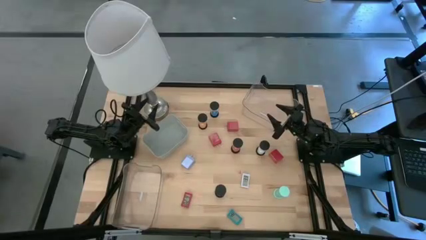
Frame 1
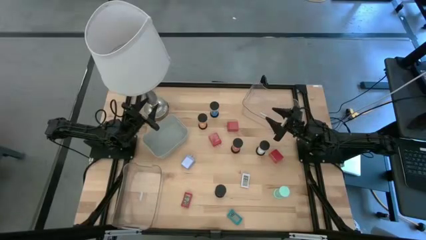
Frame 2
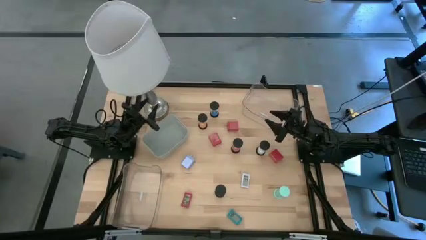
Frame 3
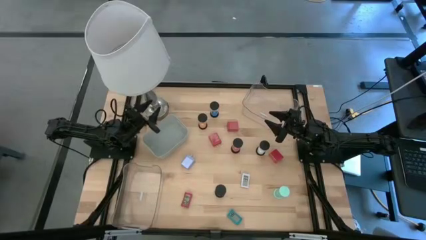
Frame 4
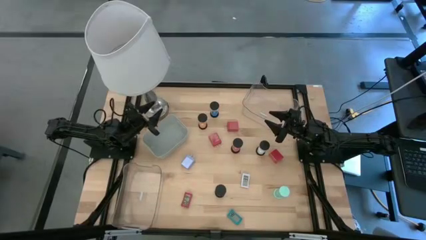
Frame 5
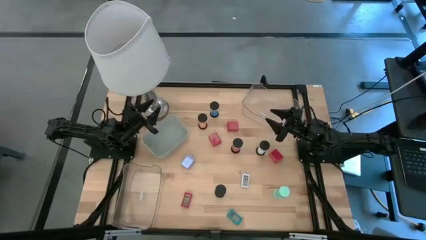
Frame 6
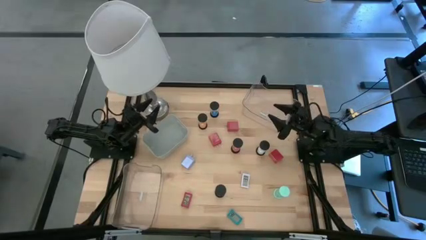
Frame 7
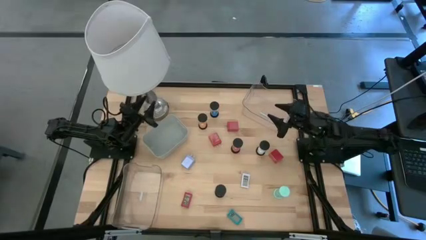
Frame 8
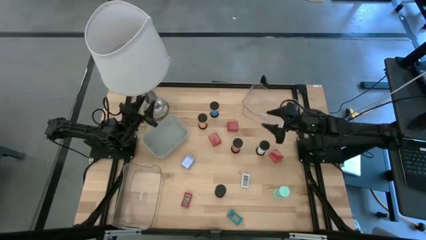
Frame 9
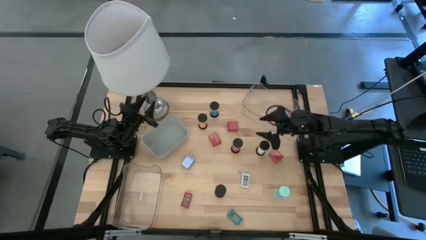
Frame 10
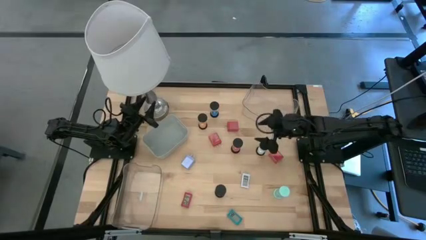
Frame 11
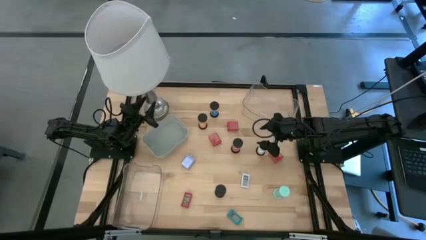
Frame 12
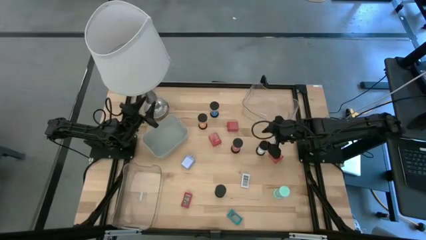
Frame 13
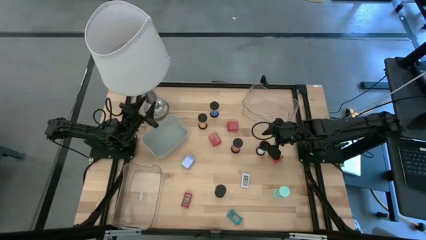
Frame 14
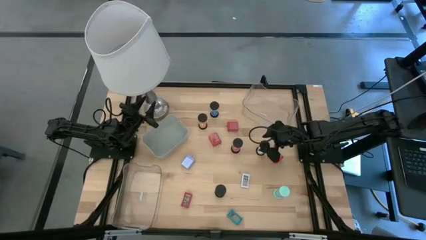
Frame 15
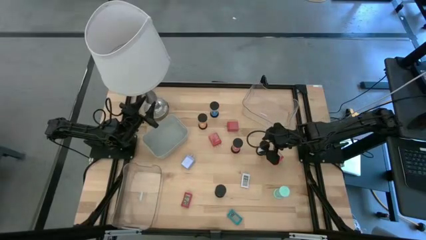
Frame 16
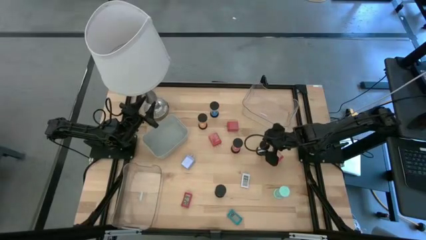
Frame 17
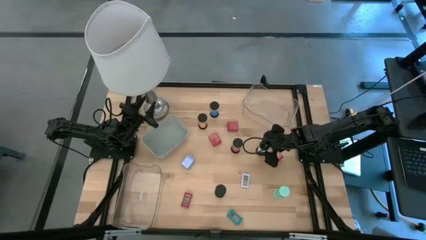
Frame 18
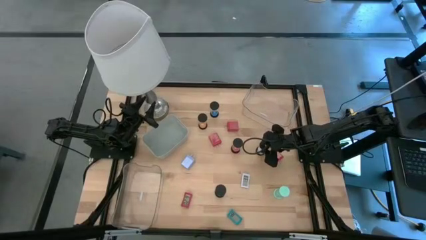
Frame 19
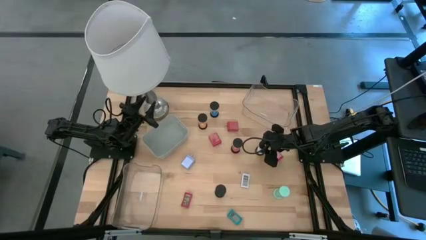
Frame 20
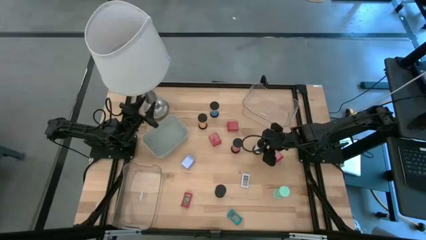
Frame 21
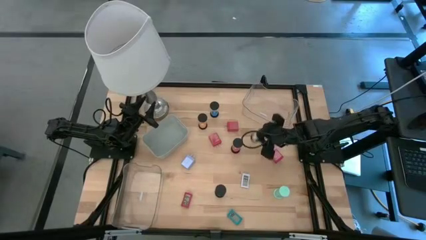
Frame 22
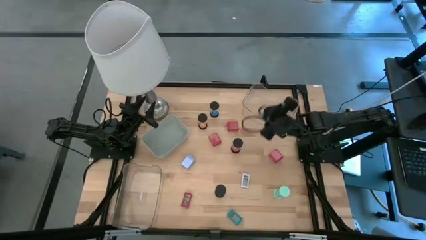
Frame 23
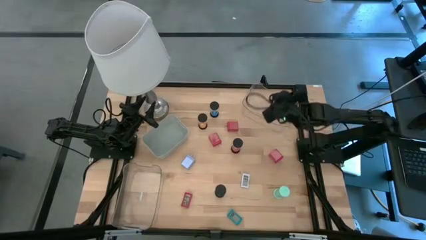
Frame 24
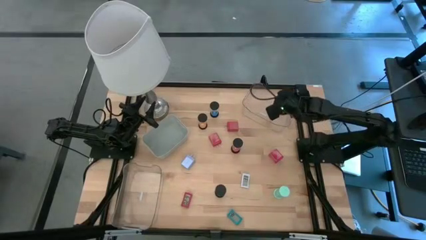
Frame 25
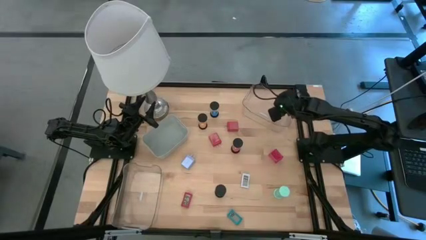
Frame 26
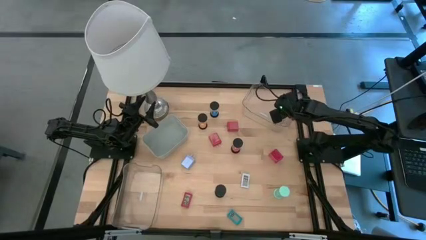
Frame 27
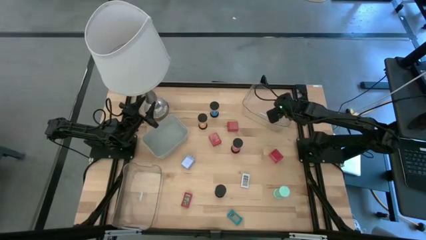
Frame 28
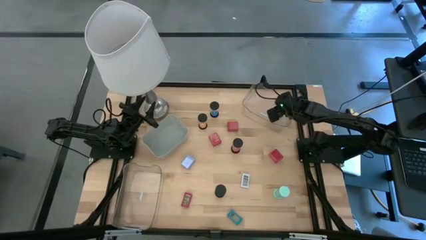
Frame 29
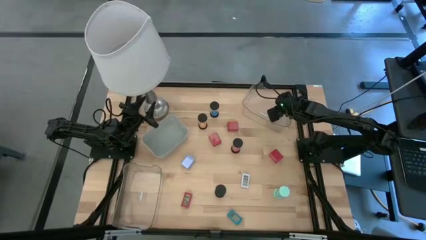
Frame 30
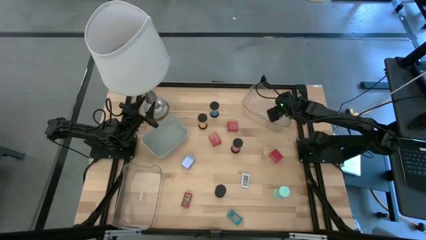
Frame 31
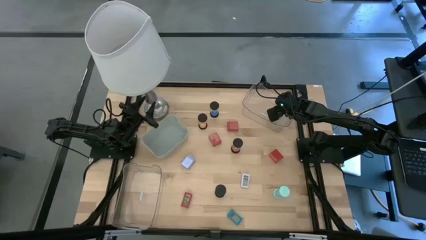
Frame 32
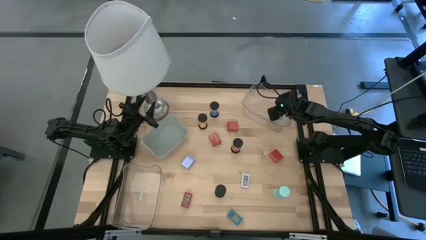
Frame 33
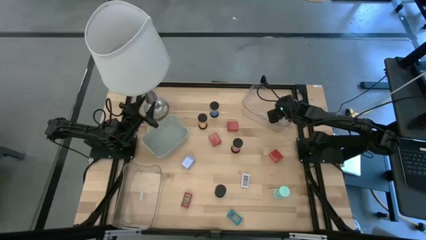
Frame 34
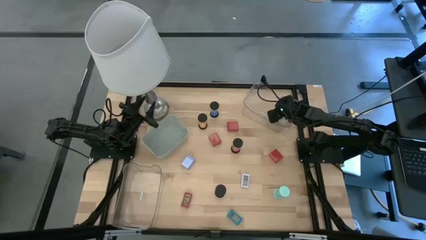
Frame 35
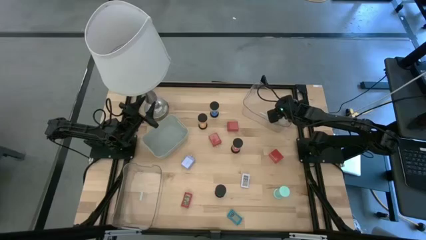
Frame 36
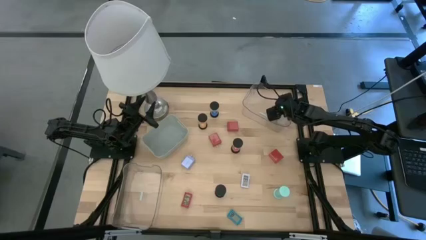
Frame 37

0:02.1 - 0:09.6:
Task: Pick & Place Office items
Put the white hourglass into the top transparent bin

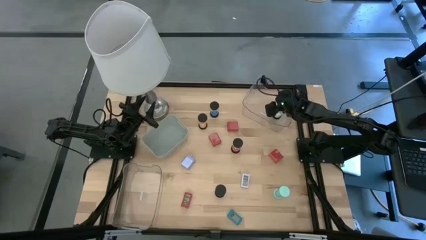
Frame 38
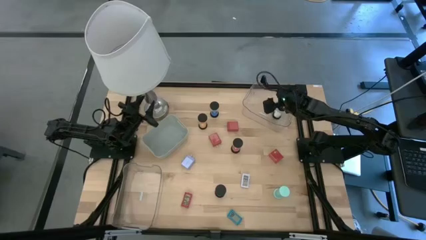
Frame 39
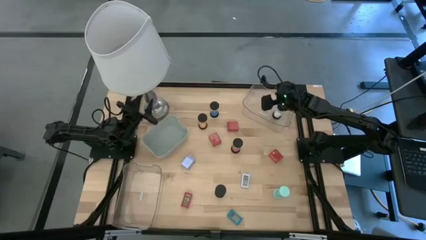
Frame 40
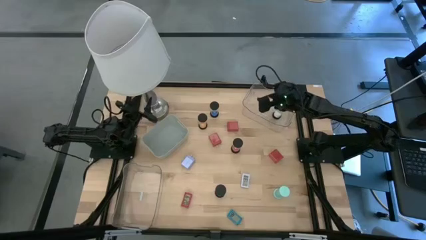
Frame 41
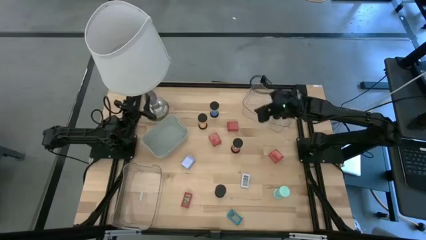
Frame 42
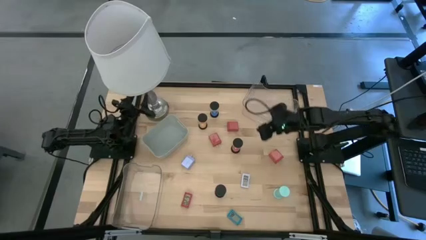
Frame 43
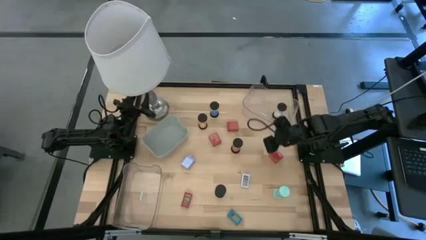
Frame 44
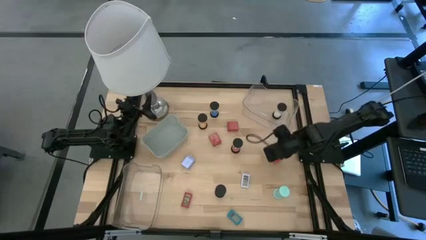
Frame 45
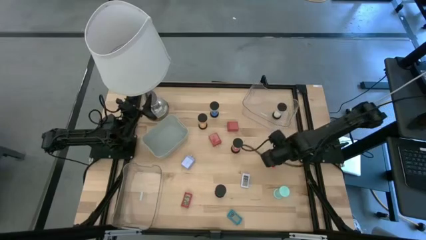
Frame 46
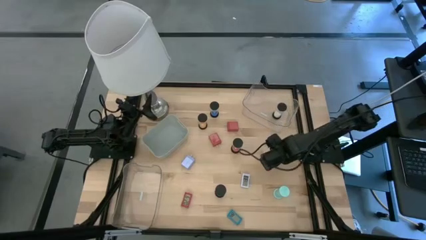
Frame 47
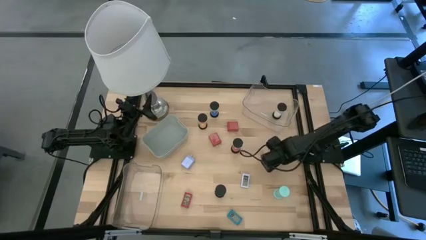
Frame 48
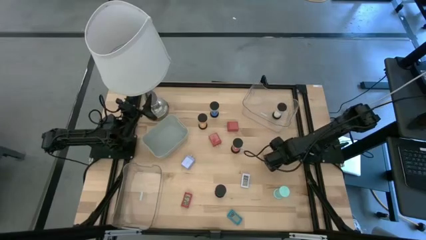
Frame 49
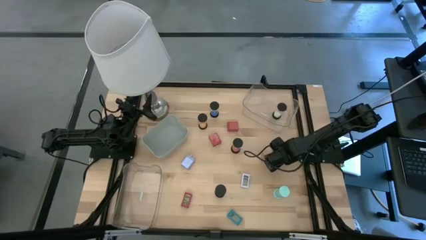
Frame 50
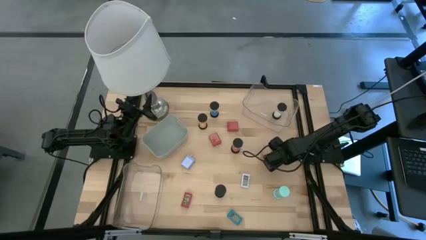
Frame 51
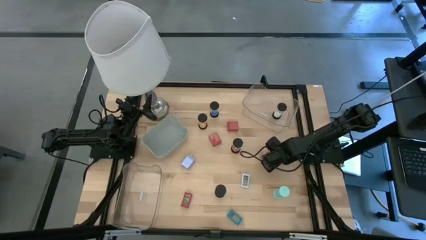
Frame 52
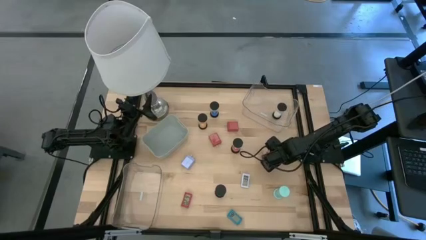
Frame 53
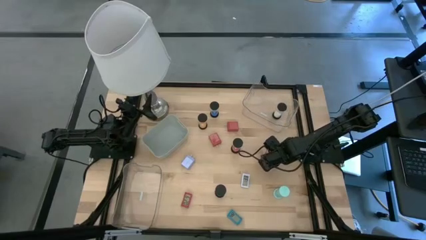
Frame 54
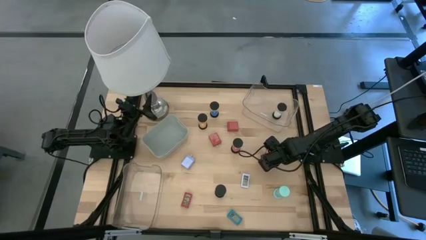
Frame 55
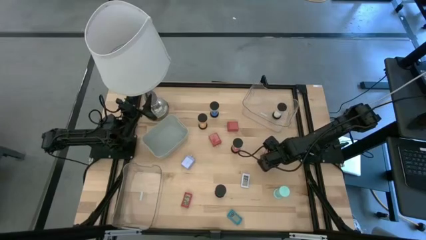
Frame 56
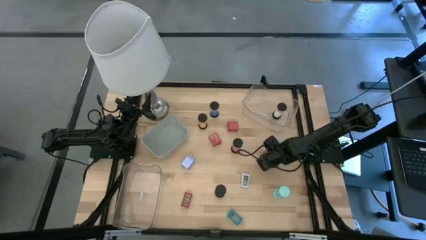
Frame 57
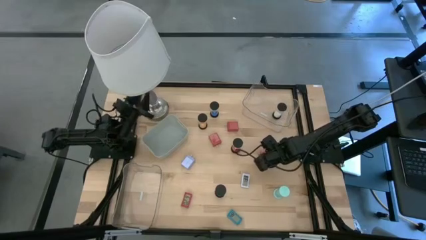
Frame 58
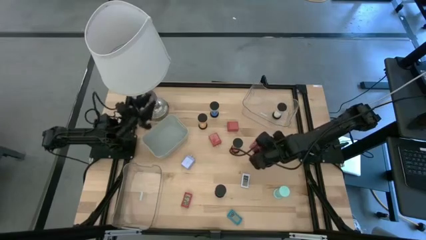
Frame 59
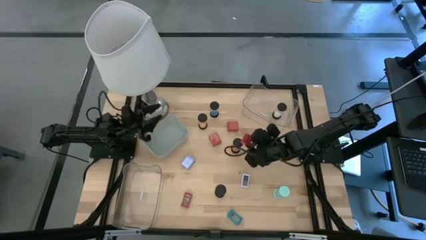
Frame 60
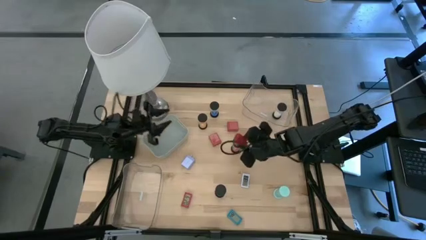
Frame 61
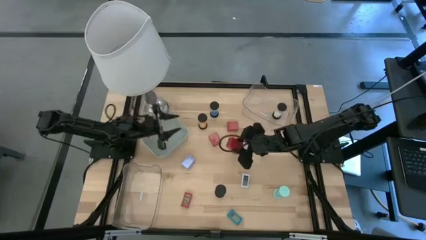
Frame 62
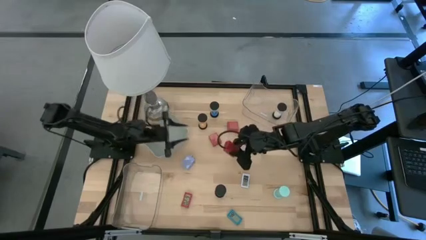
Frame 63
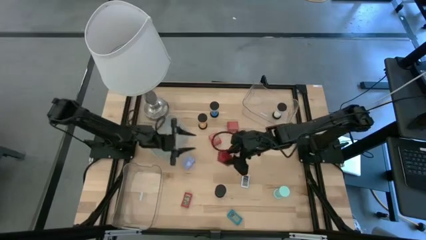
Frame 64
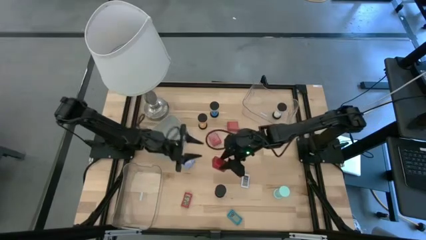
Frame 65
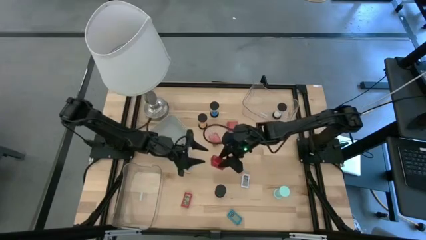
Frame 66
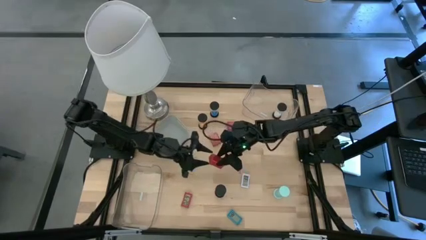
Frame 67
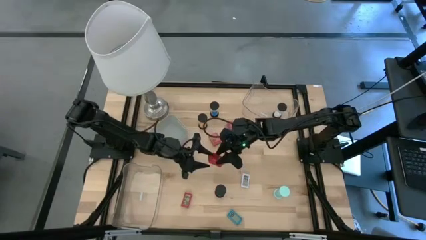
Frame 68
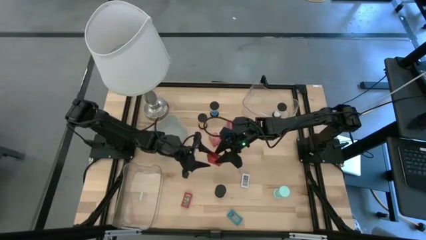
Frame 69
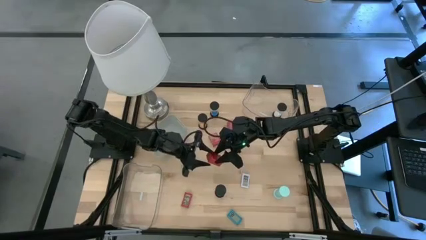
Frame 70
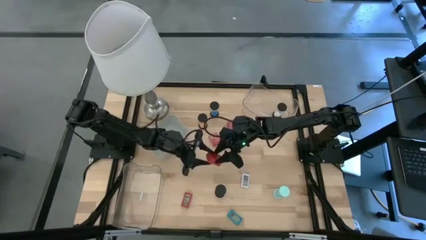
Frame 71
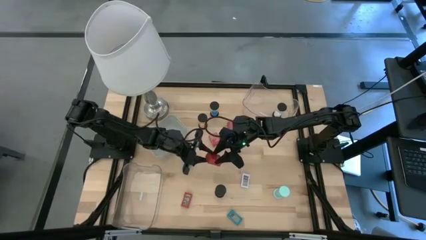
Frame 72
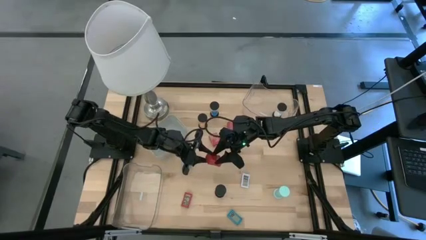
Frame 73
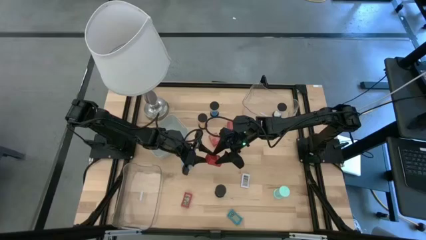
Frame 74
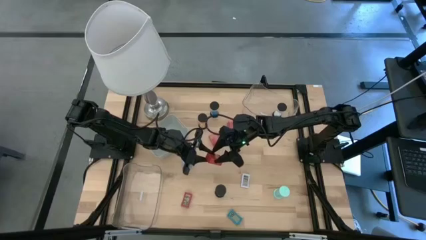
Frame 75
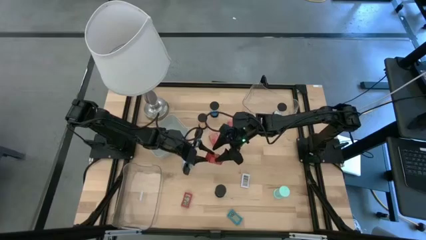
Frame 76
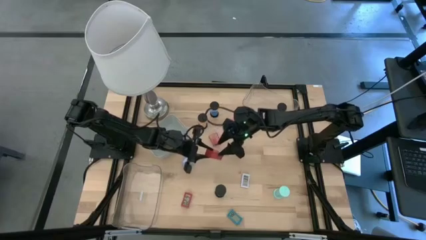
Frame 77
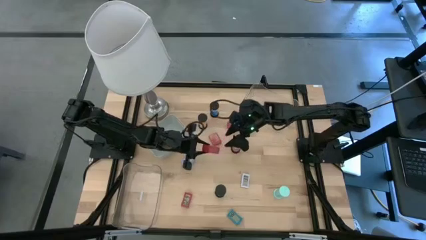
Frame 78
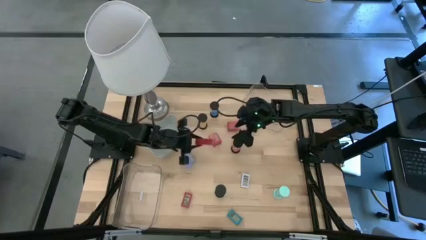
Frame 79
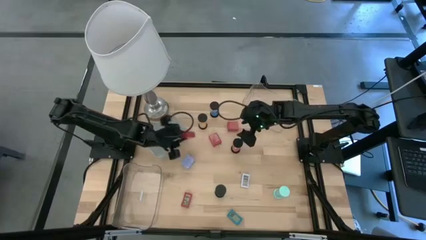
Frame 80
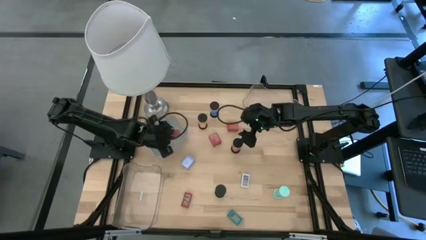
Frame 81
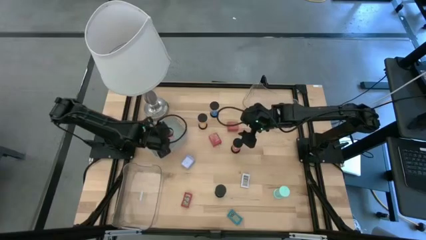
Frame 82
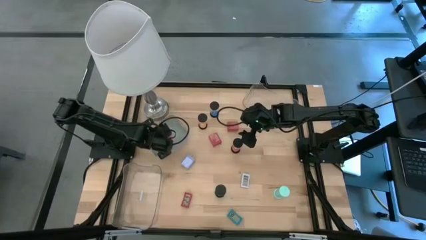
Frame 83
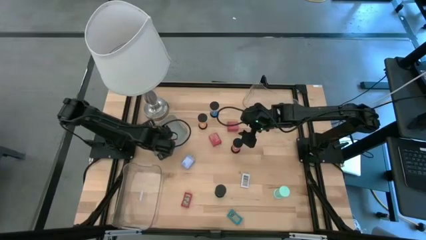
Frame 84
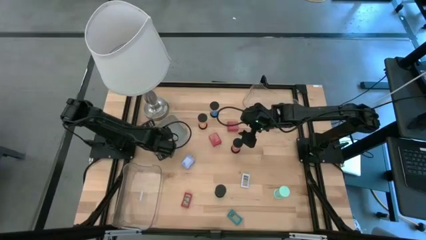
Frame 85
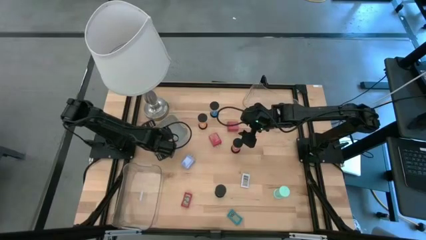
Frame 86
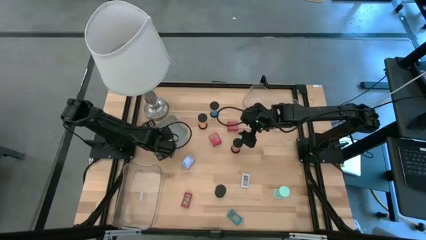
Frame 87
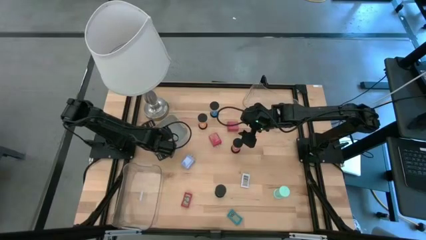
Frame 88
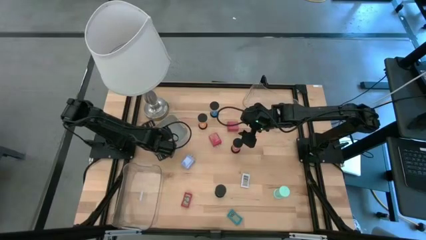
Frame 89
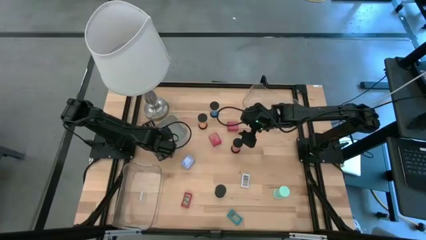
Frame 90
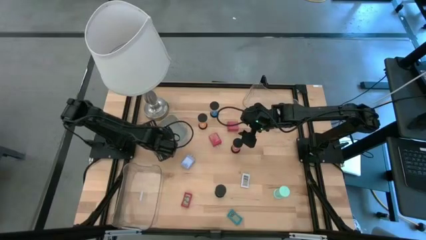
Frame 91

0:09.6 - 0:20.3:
Put the right red charger adapter into the gray bin
